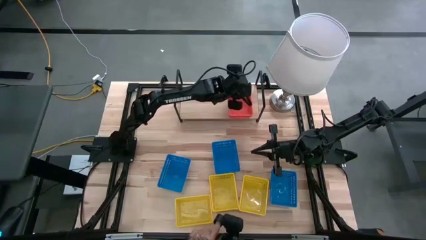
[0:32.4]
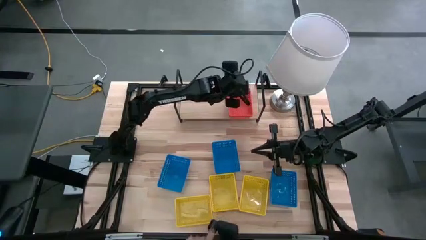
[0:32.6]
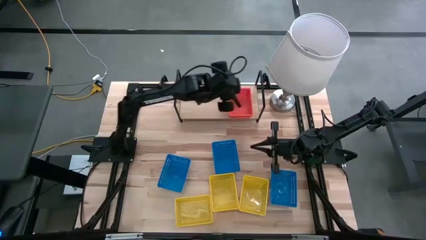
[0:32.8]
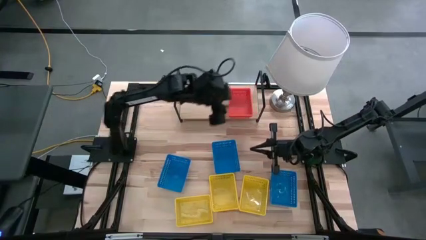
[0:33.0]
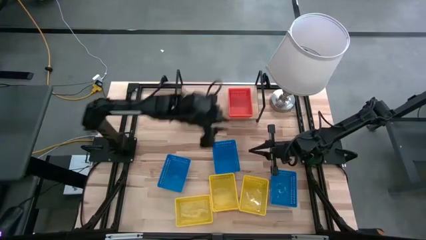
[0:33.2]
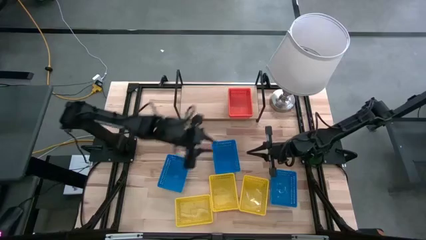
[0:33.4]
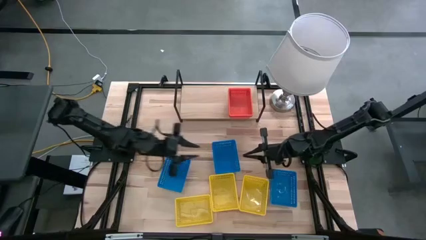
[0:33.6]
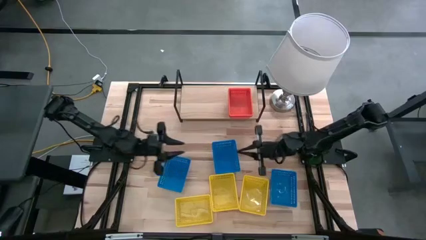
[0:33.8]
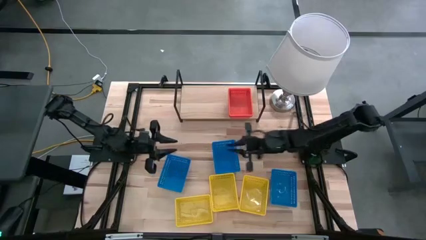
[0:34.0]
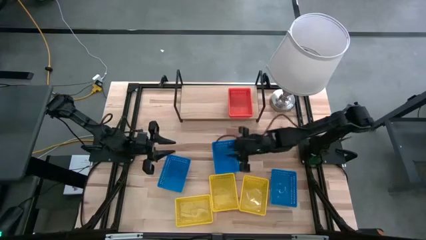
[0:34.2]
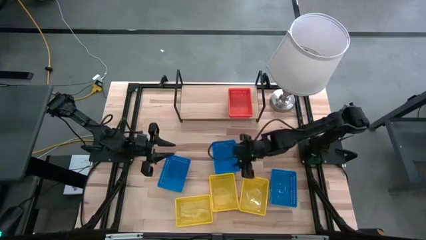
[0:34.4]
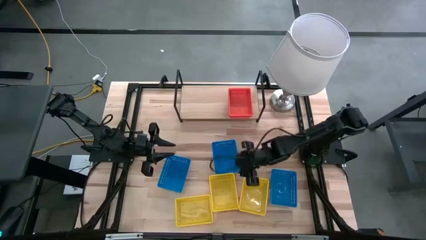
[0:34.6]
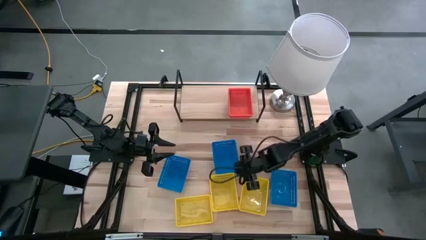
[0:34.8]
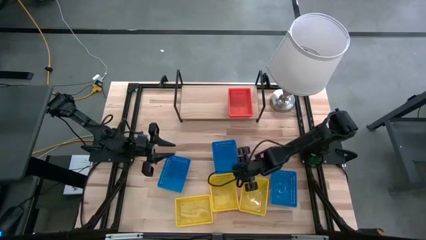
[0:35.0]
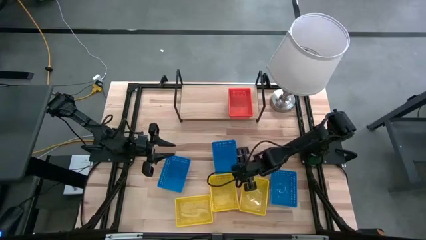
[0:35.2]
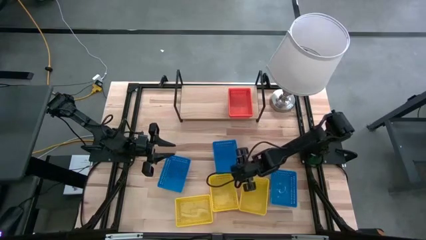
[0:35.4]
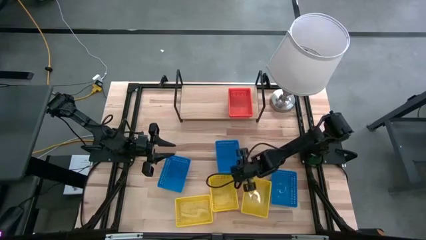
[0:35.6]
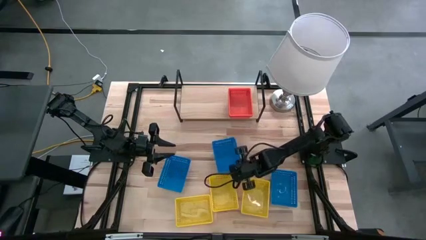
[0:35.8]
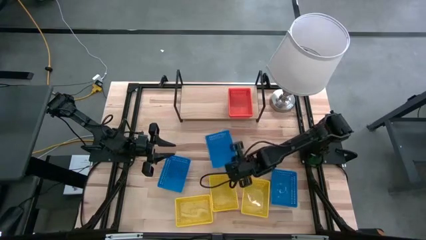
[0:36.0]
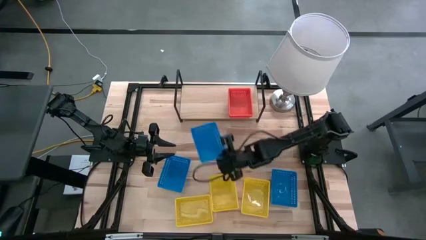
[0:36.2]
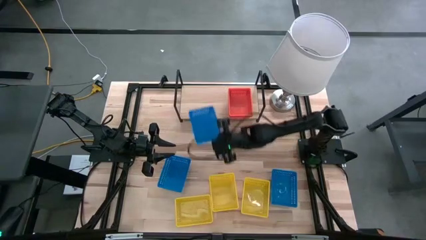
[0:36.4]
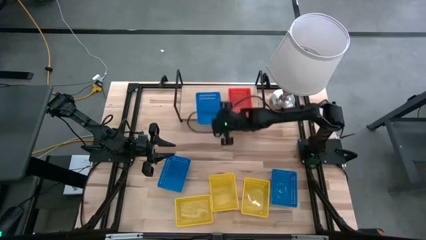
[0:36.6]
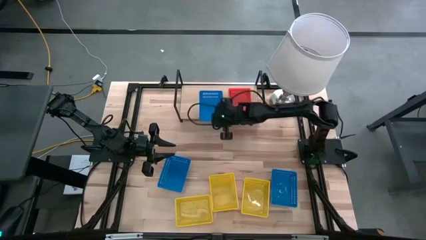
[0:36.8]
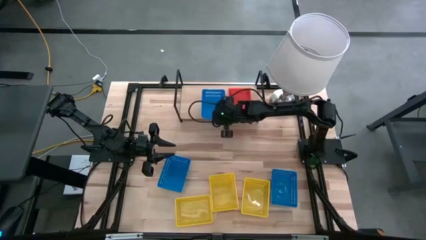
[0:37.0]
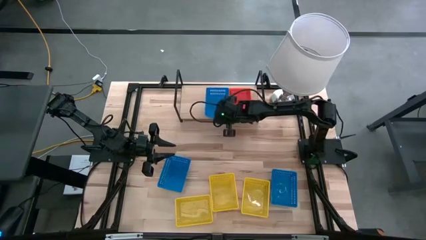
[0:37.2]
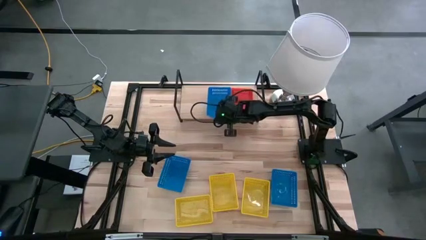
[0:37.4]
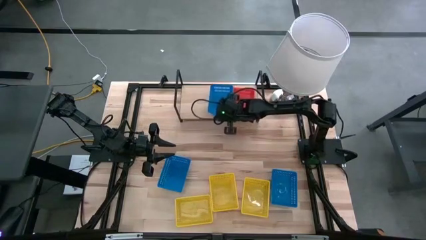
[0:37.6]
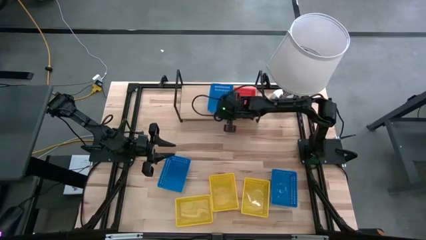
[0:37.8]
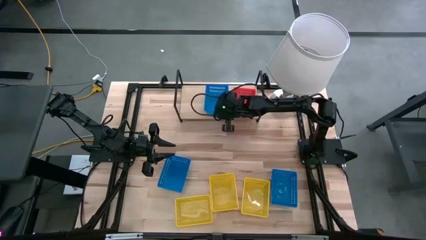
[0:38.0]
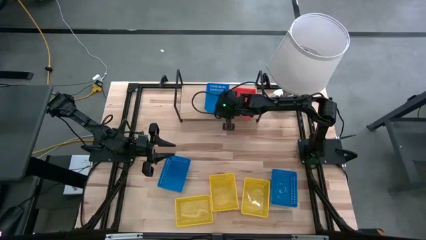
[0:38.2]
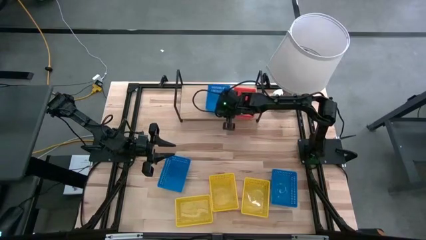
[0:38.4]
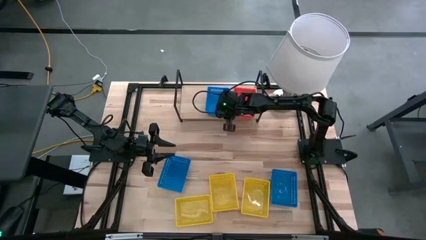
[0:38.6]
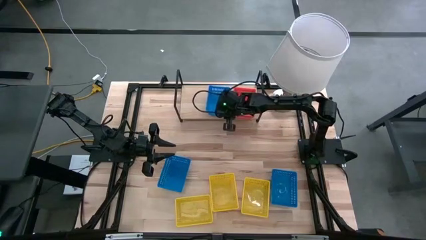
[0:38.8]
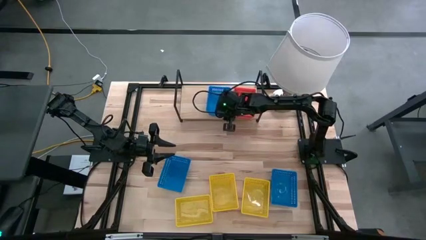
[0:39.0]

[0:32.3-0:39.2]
Task: Stack baskets on shelf by color
Put the middle blue bin on the shelf

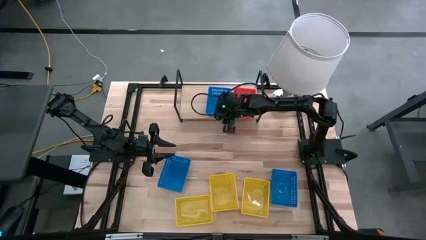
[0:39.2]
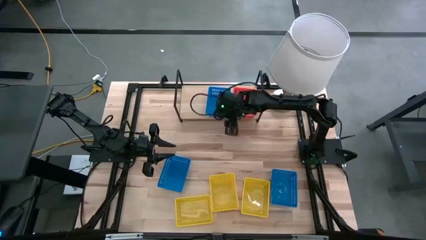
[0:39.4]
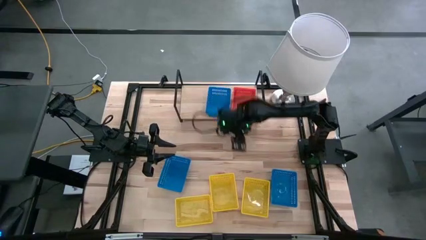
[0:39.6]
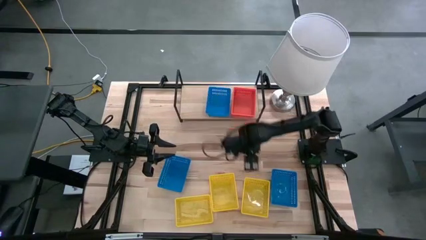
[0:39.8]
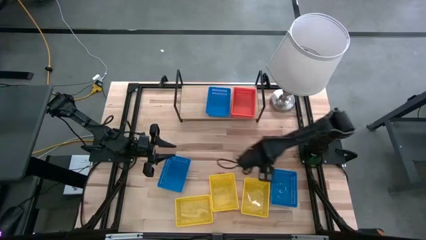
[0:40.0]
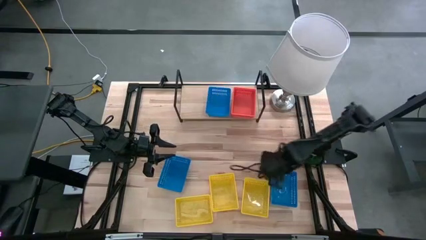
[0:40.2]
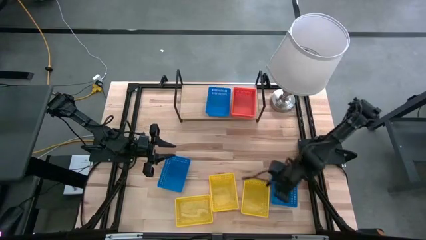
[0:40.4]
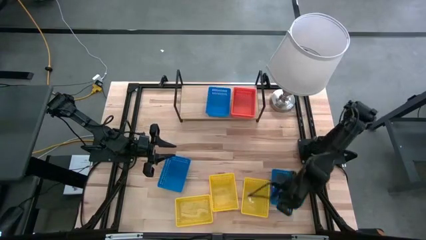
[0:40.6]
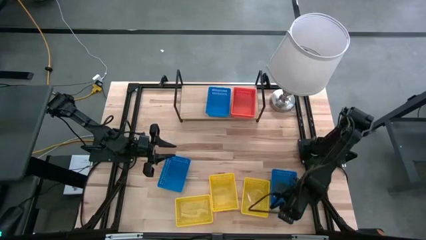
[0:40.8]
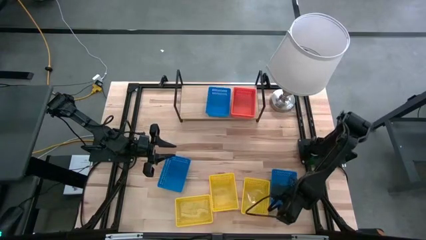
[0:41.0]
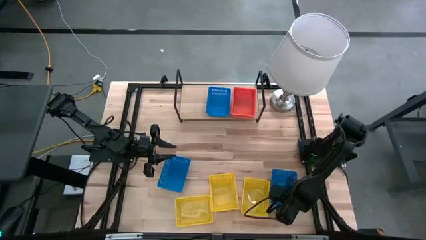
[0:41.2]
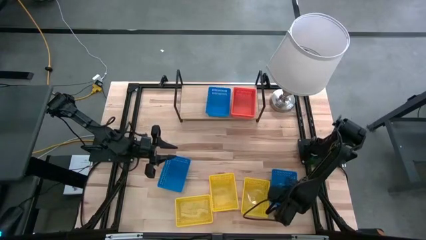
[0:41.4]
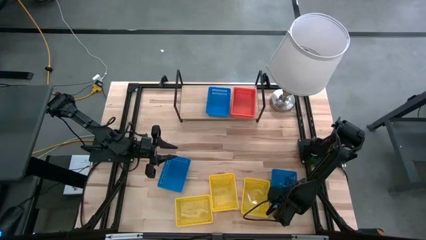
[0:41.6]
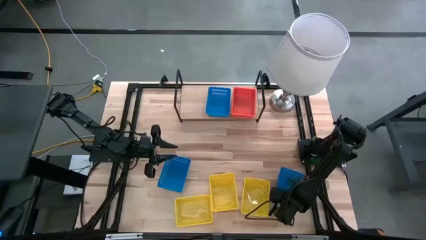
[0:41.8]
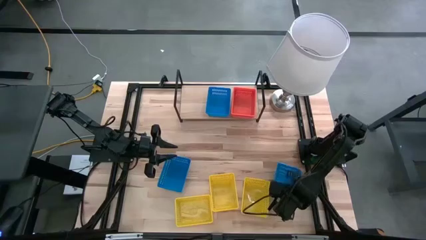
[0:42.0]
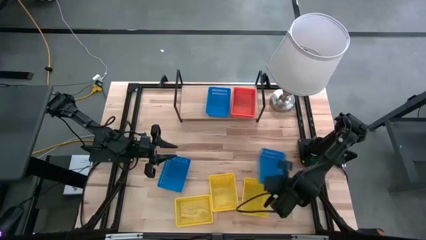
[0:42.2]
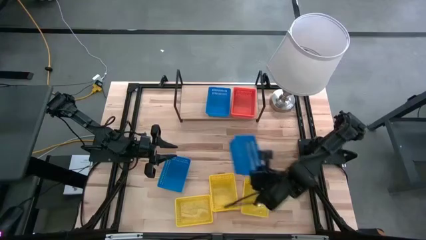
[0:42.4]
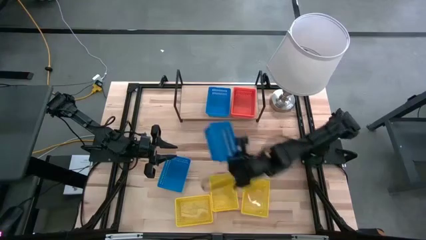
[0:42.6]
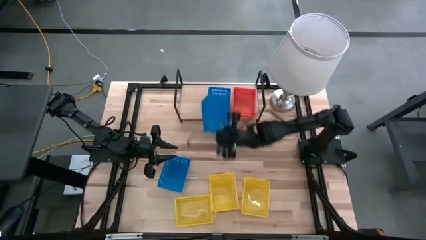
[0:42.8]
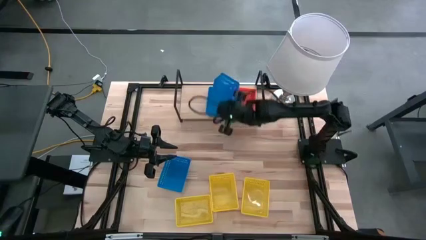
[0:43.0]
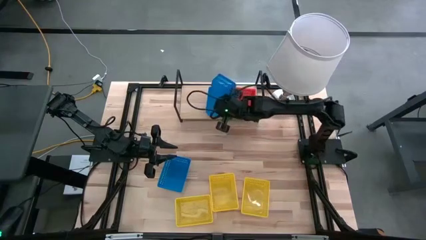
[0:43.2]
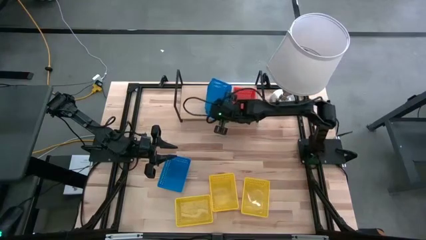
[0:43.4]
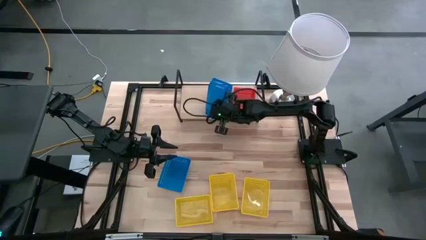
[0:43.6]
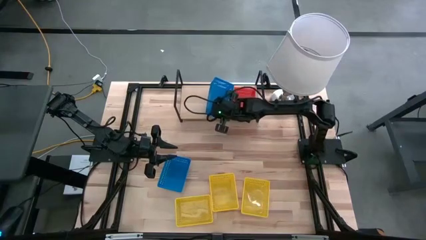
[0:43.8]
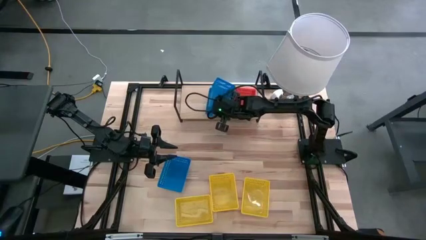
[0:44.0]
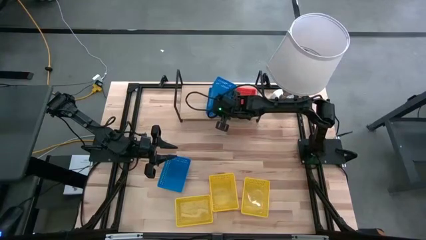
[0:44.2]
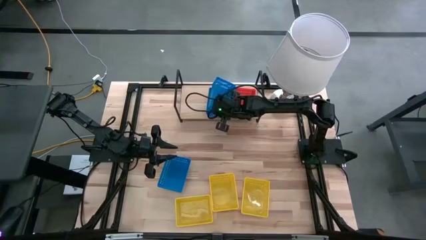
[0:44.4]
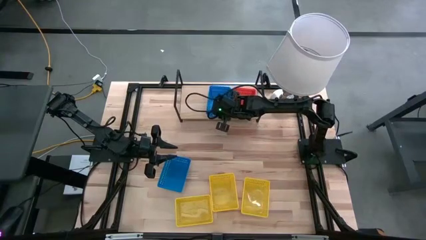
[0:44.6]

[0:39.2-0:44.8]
Stack the right blue bin on top of the other blue bin on the shelf

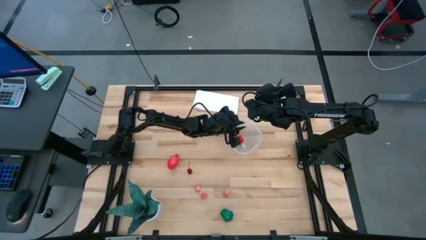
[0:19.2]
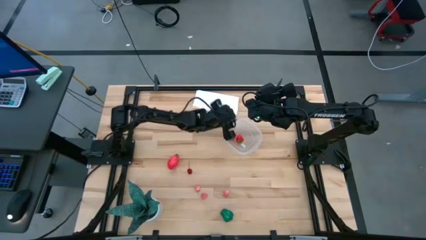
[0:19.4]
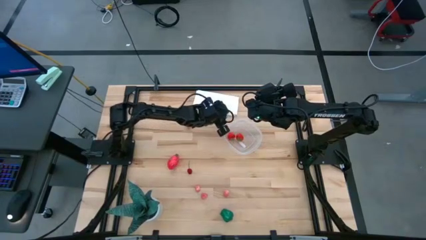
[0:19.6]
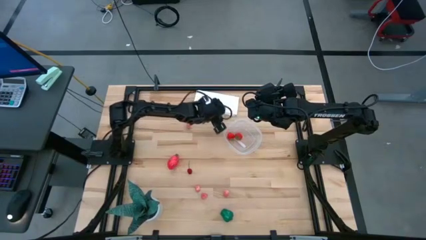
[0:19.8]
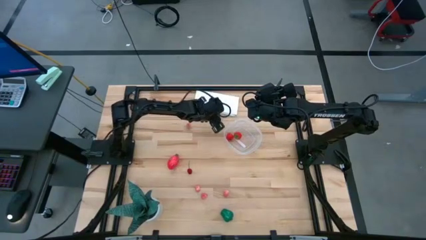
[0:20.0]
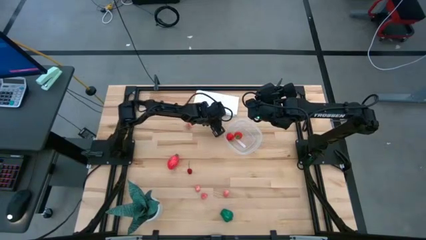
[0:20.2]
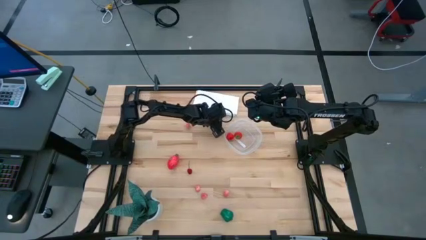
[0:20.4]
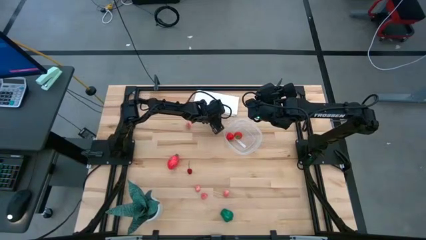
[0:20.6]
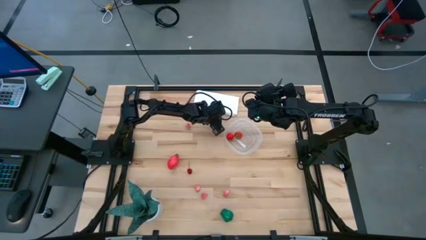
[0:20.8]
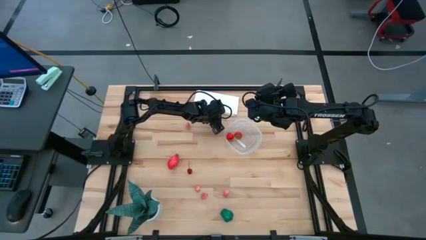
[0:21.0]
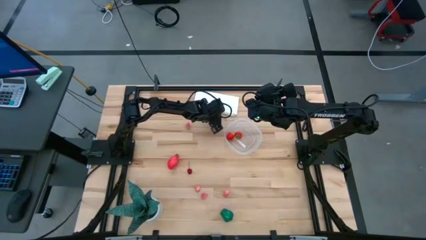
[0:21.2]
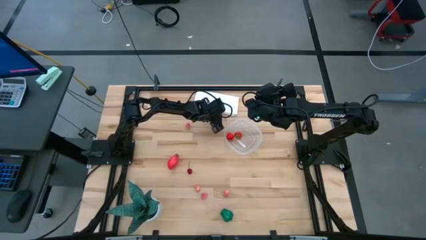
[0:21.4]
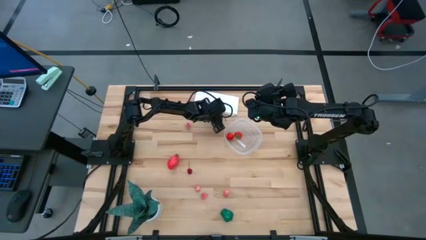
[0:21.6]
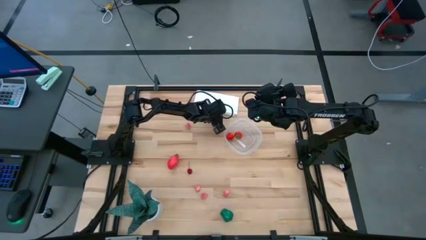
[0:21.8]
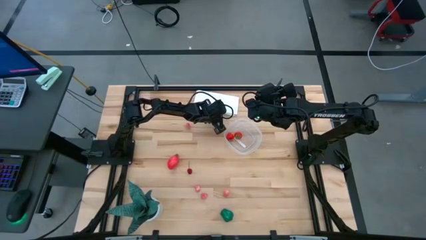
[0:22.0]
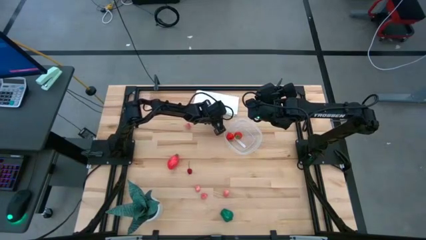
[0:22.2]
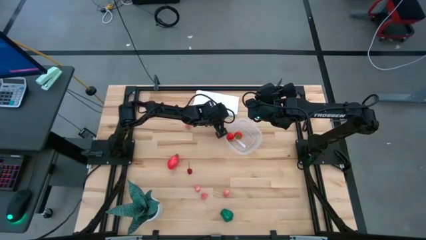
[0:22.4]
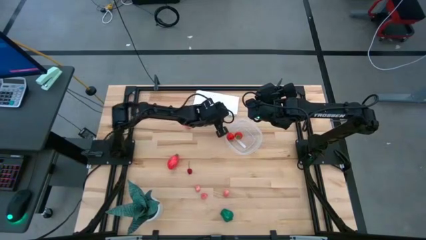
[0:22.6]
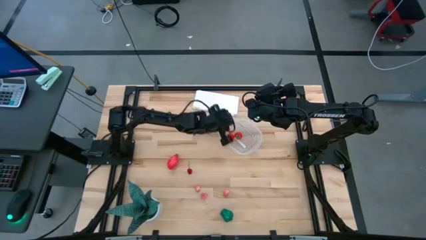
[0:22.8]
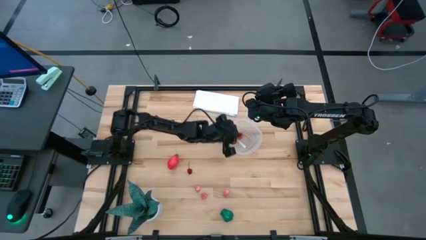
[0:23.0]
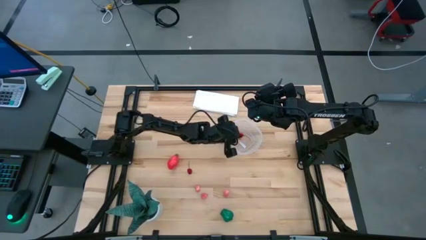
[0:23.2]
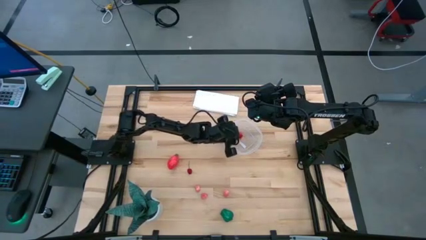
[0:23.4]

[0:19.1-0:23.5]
Task: Pick and placing Produce into tupperware
Put the top red cherry into the transparent bin
